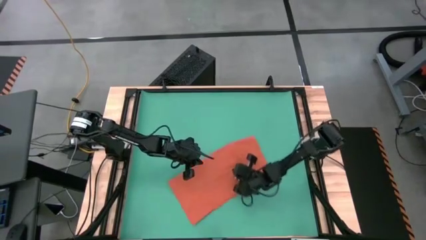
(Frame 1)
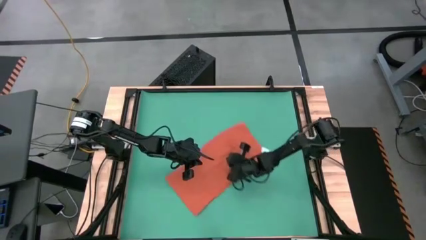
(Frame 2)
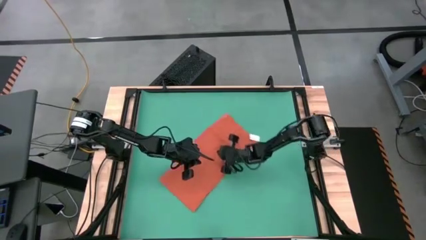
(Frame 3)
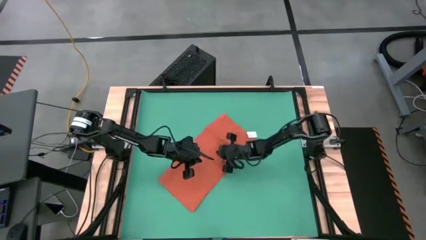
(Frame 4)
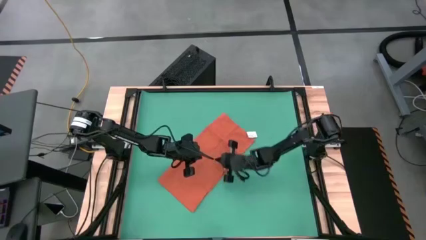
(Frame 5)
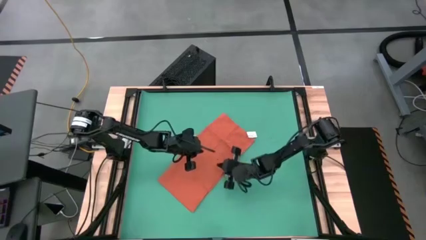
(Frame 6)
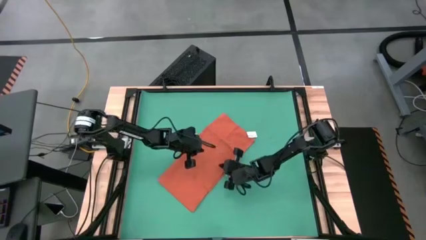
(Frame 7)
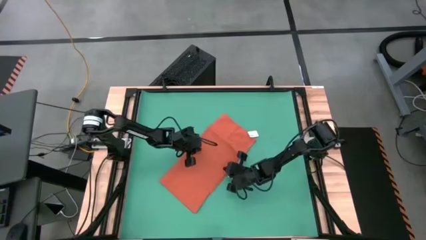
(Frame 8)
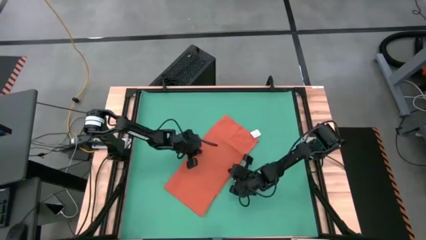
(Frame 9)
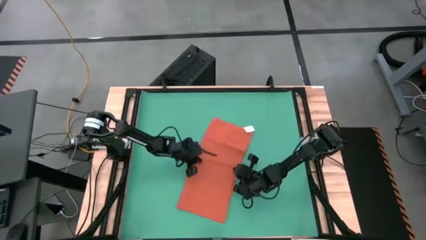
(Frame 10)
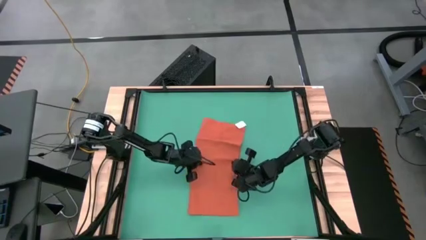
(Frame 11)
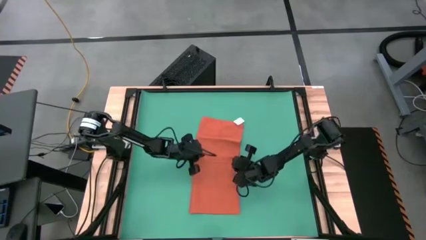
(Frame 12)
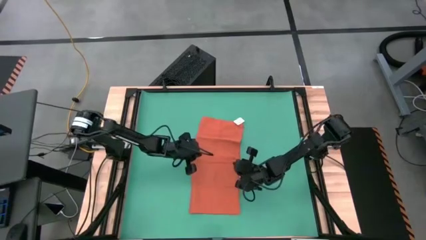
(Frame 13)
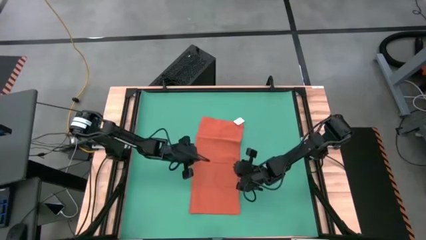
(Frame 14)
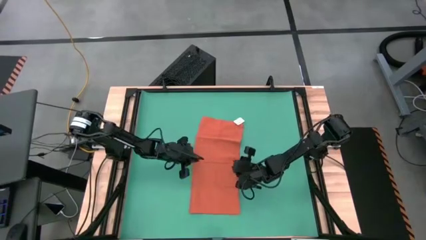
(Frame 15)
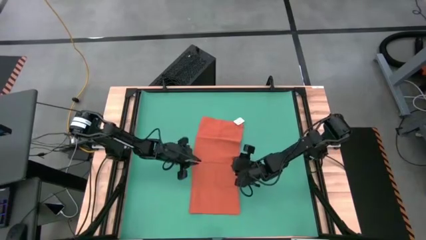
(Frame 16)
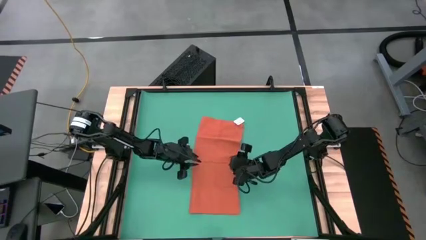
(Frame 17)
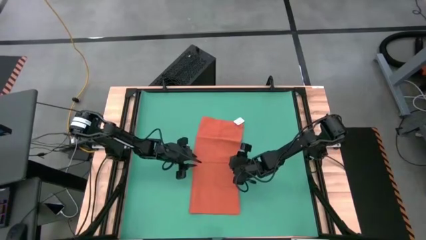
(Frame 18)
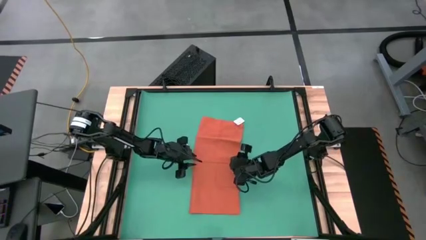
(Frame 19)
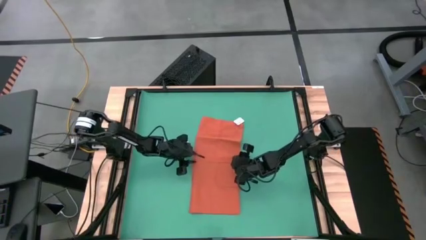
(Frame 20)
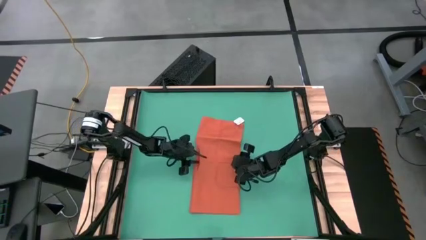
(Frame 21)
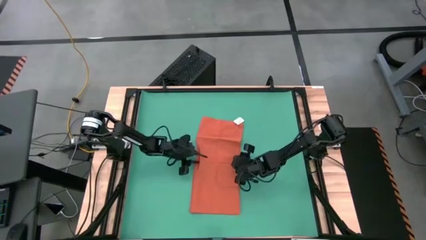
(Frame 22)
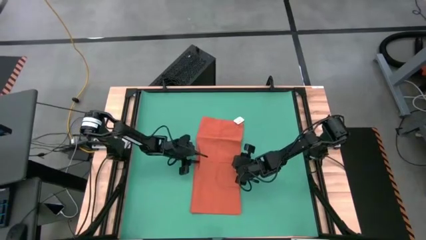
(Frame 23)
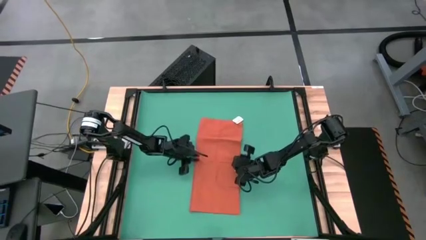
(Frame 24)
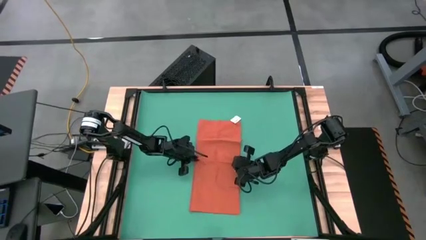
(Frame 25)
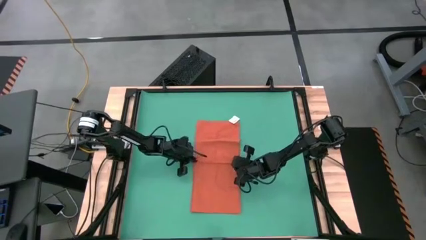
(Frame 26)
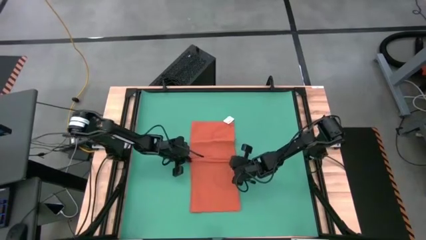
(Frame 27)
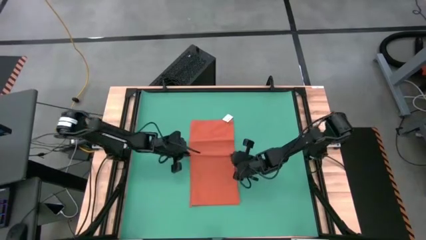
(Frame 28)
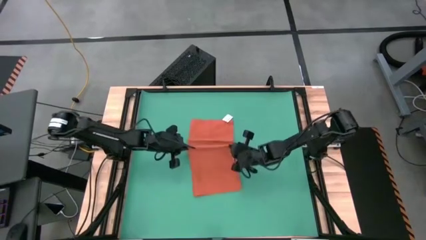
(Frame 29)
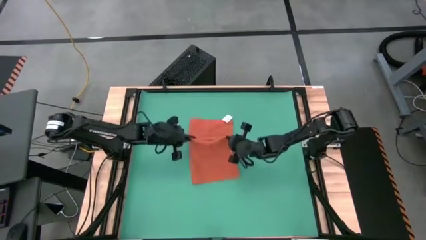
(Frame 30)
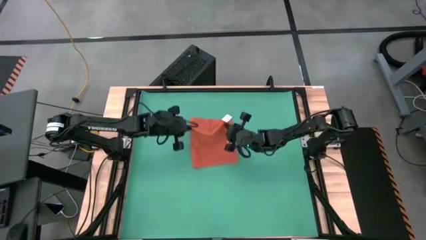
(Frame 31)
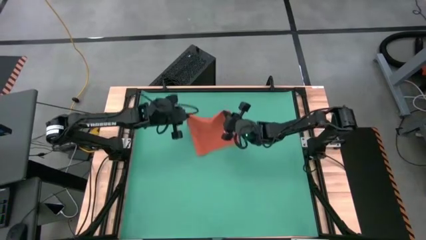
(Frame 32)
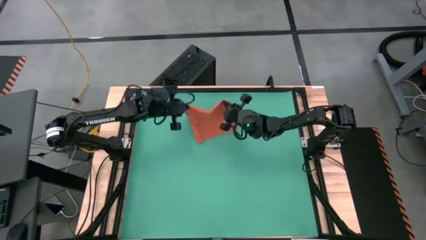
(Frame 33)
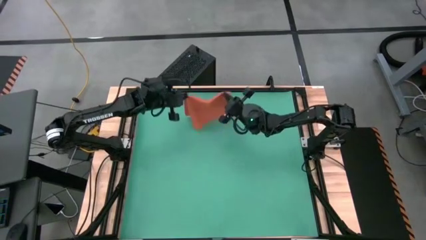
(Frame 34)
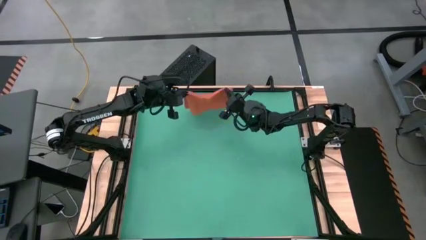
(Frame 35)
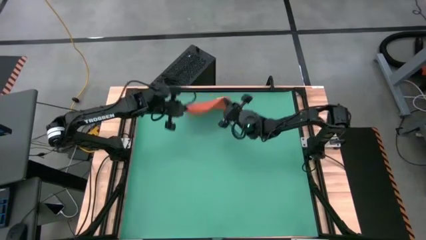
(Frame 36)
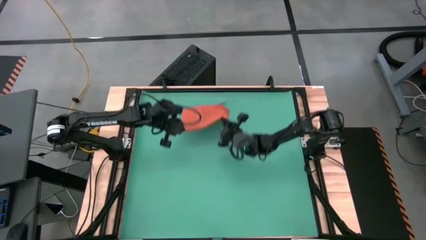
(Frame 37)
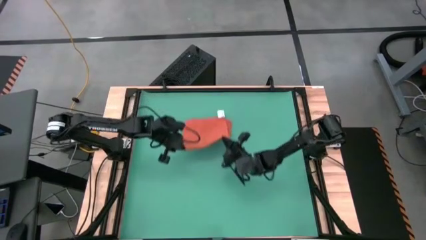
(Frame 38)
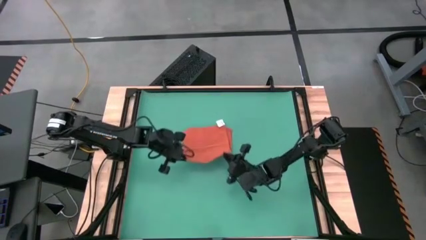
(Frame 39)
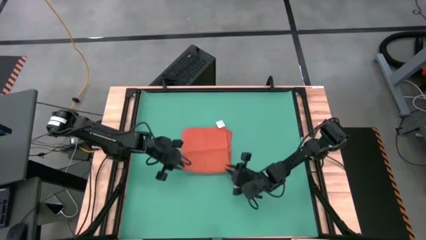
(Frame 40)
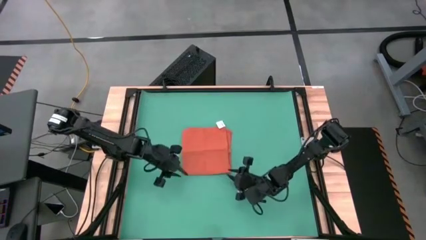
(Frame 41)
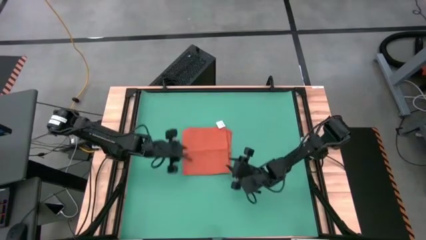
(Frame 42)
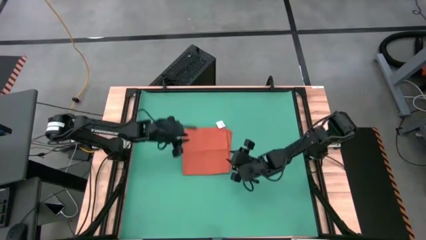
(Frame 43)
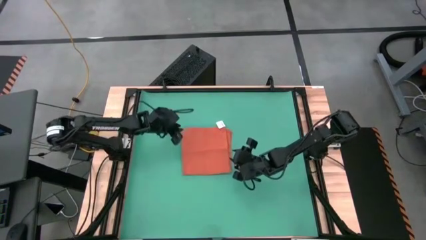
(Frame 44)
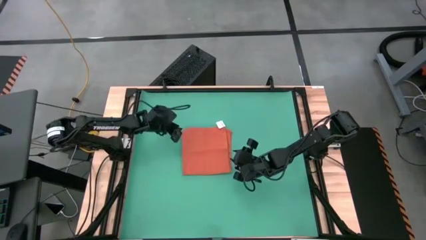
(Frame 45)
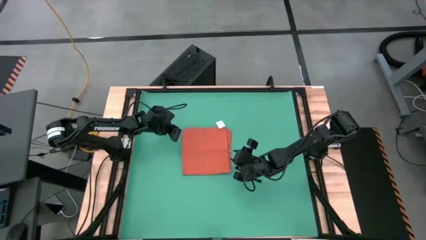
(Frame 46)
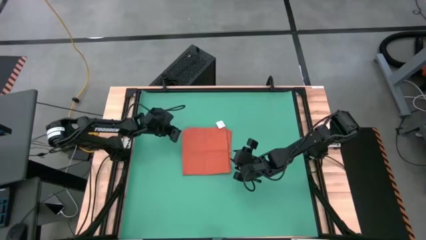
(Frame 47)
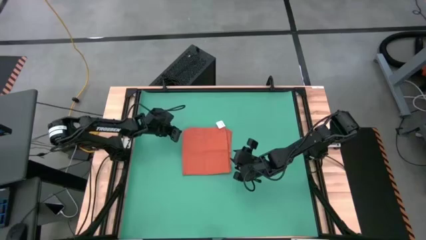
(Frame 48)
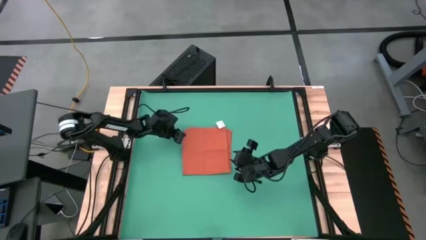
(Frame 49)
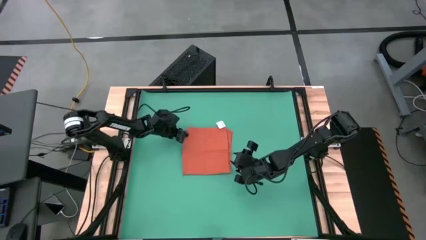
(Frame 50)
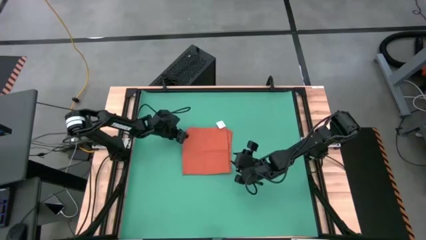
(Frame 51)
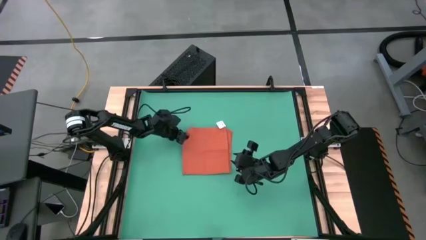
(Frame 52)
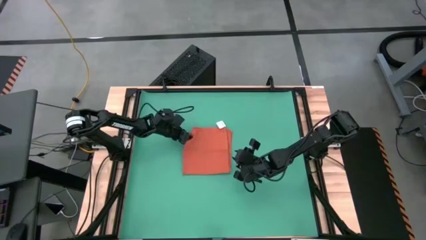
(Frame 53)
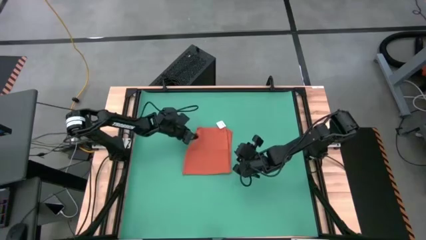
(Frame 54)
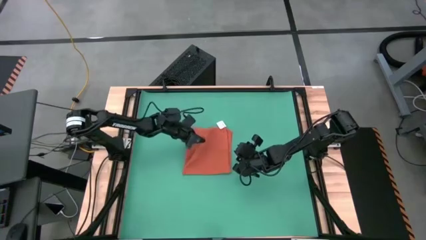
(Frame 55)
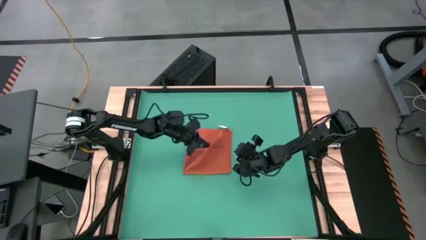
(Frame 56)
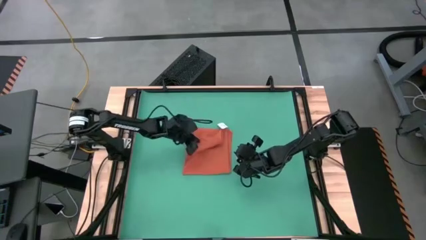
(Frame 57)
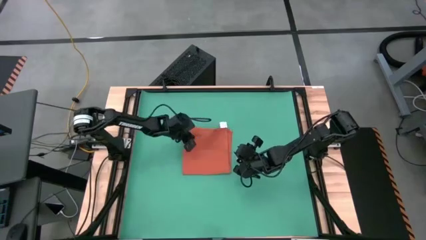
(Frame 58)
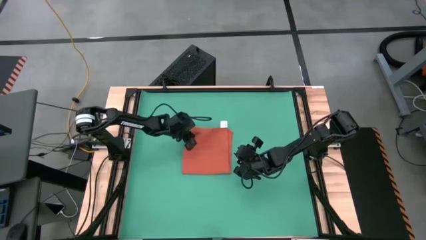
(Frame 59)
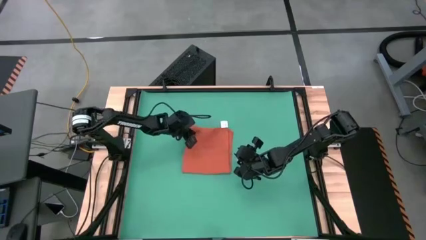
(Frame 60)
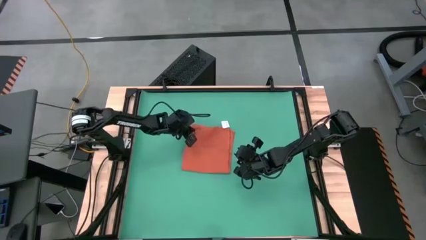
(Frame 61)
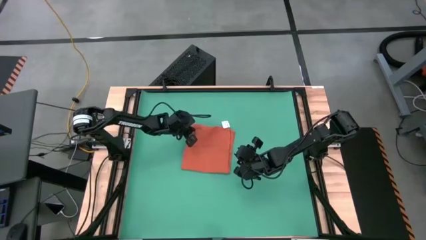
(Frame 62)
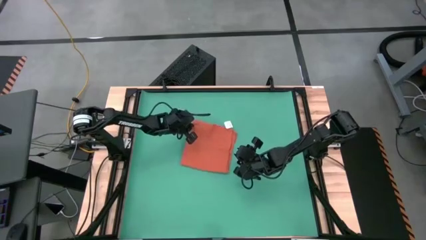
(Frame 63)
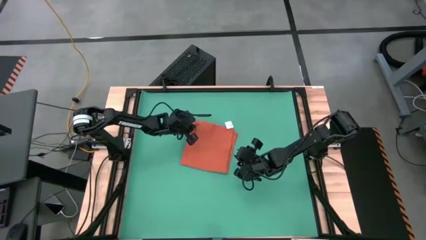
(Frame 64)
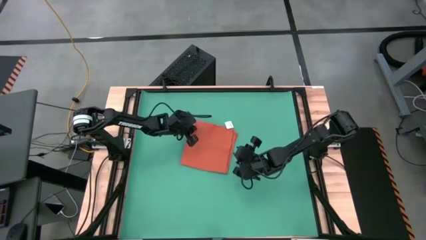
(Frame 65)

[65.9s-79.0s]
Task: Roll towel
Fold the orange towel

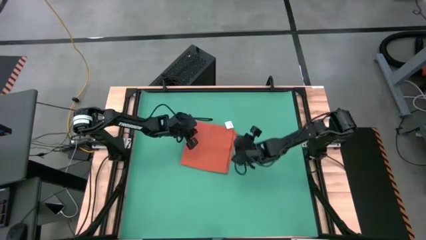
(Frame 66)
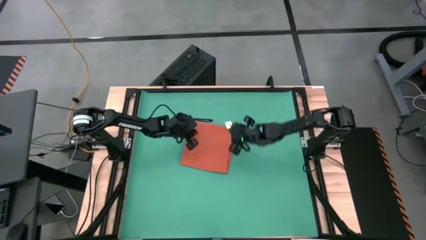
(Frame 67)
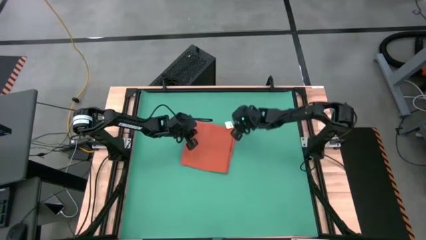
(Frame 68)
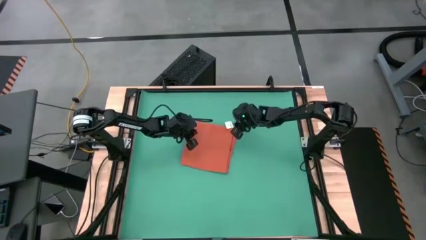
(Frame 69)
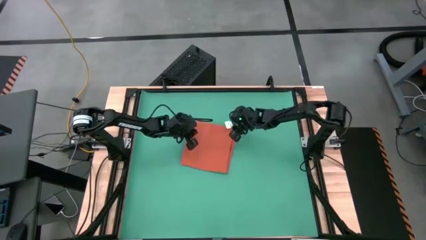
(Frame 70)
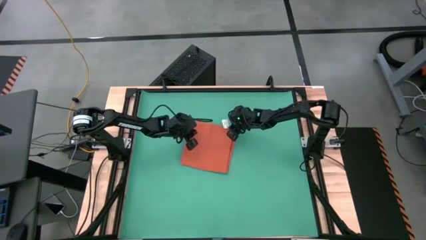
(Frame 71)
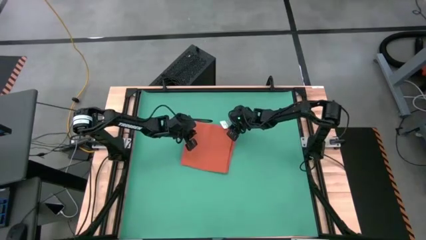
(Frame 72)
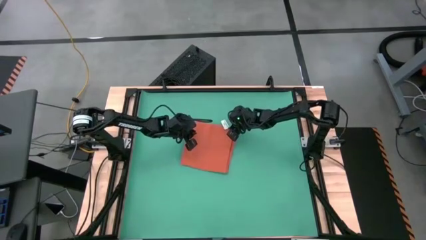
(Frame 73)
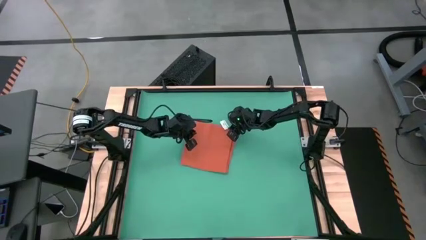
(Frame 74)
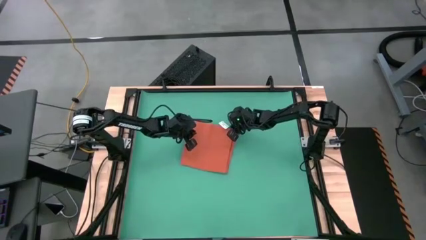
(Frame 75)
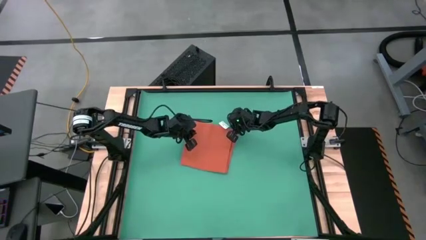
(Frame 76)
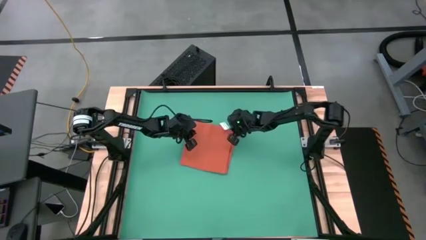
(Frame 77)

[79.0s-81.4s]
Fold the orange towel
